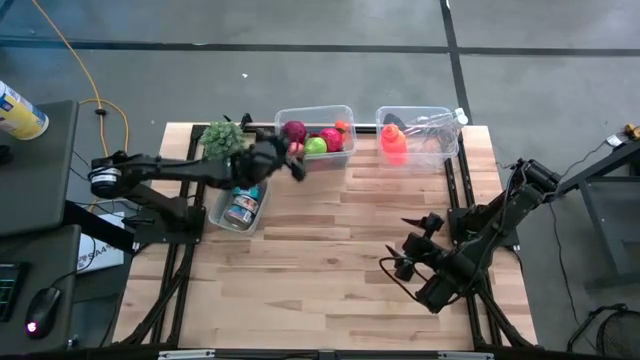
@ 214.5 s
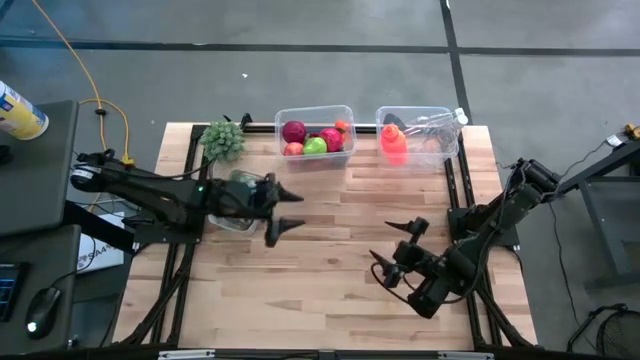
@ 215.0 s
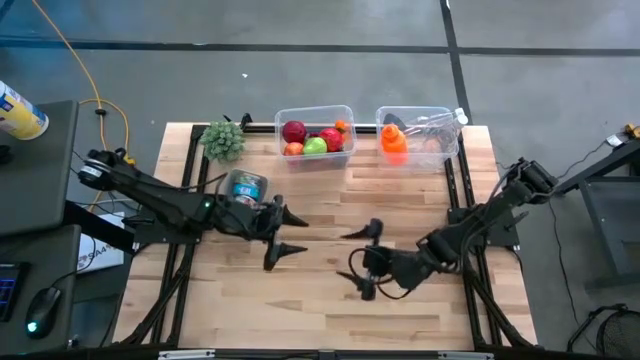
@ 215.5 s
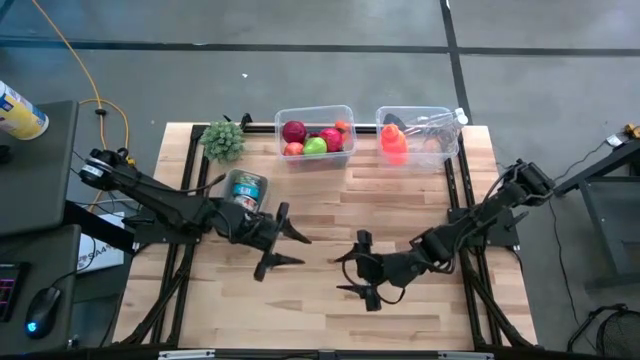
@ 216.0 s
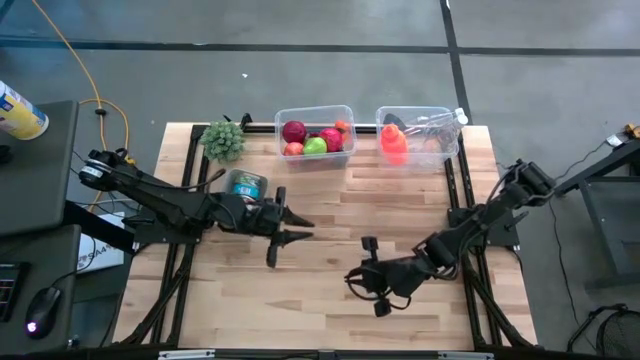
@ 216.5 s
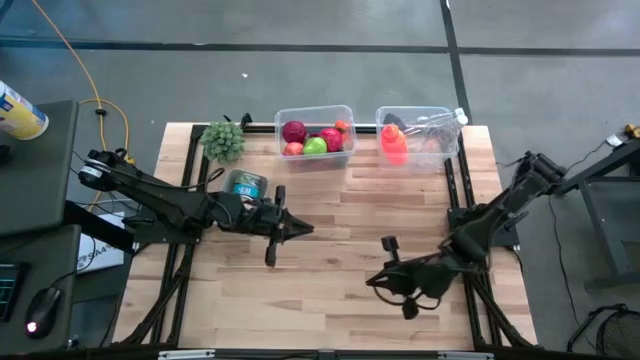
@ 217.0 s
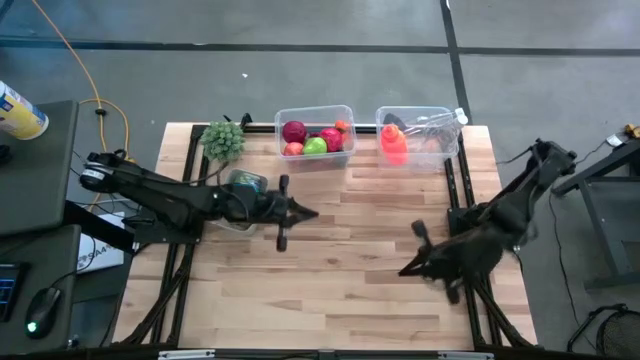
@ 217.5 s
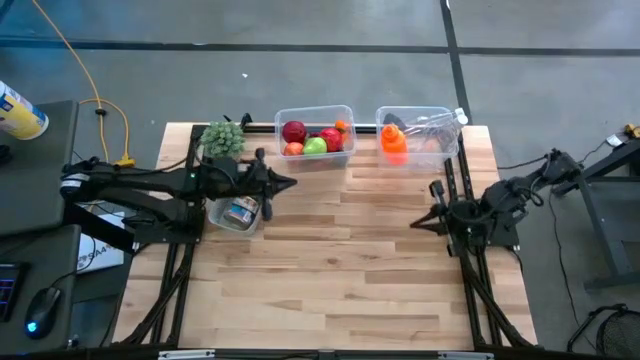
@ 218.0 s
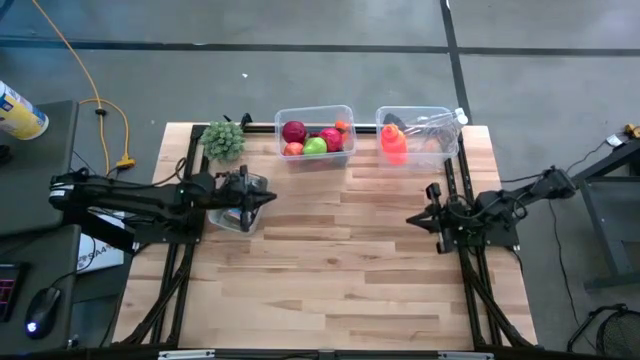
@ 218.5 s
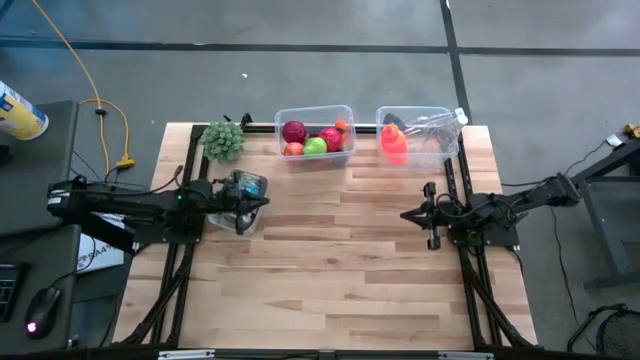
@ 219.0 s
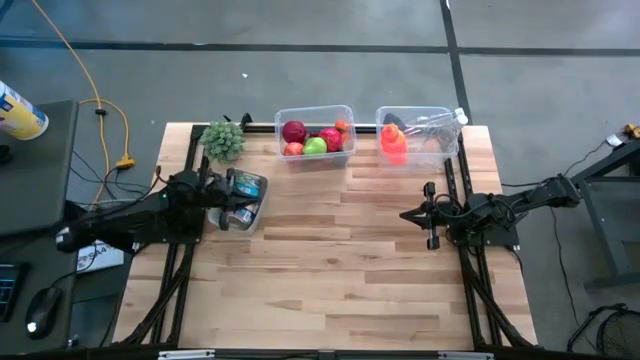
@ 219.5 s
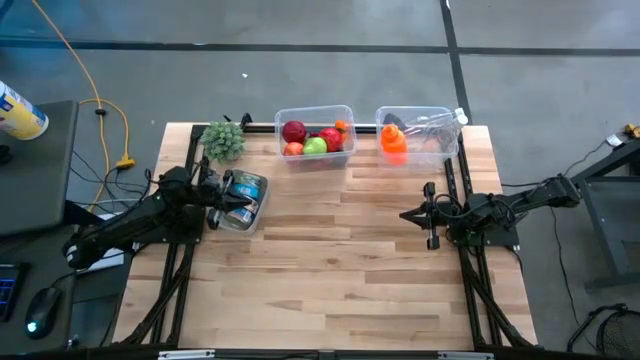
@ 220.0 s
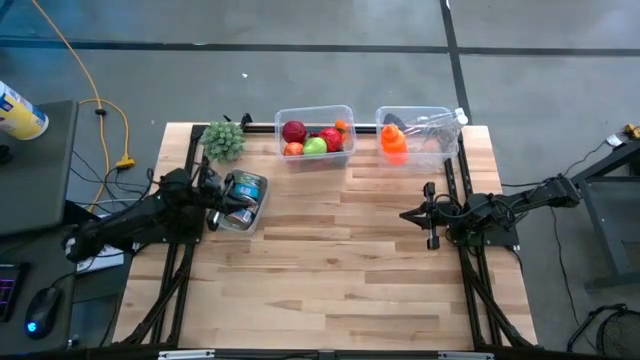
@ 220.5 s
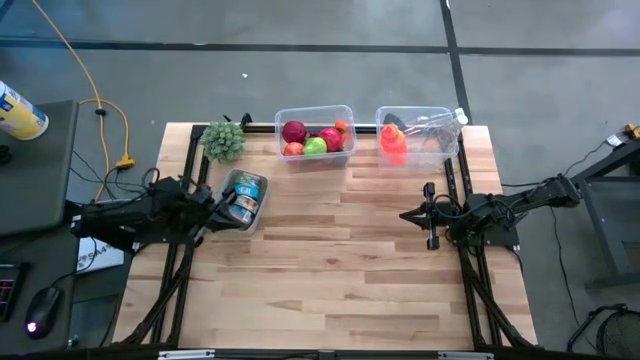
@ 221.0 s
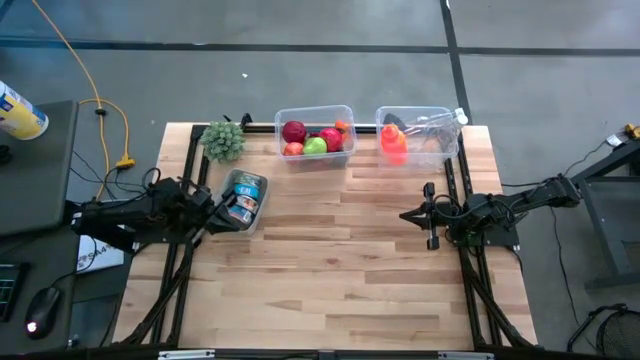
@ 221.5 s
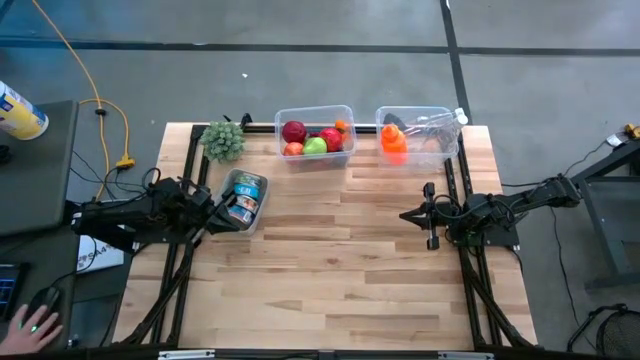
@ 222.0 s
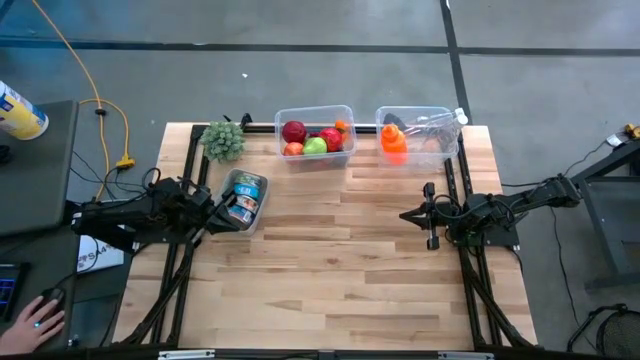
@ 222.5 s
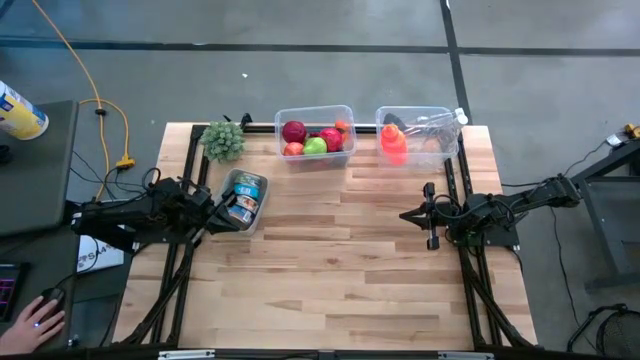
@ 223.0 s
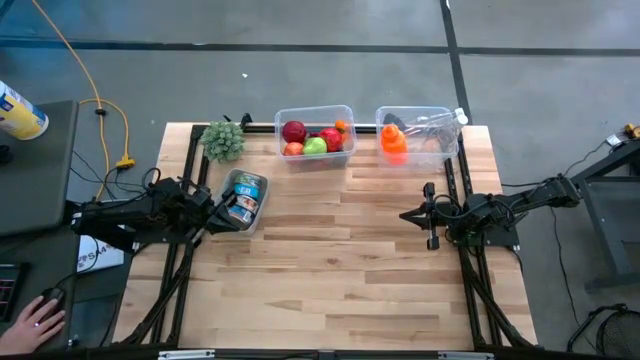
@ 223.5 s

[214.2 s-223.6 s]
Task: Pick & Place Food Item
Return to Home Position

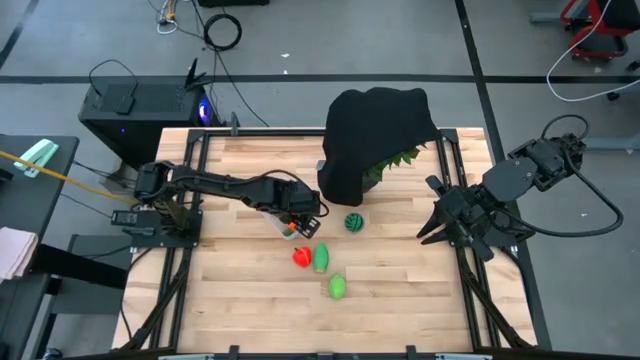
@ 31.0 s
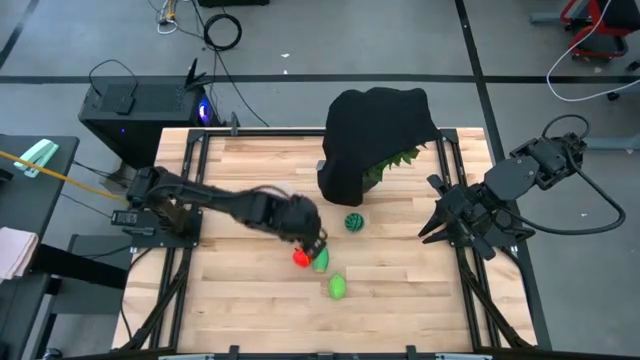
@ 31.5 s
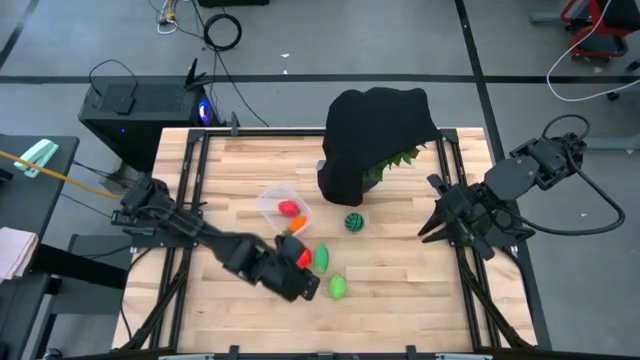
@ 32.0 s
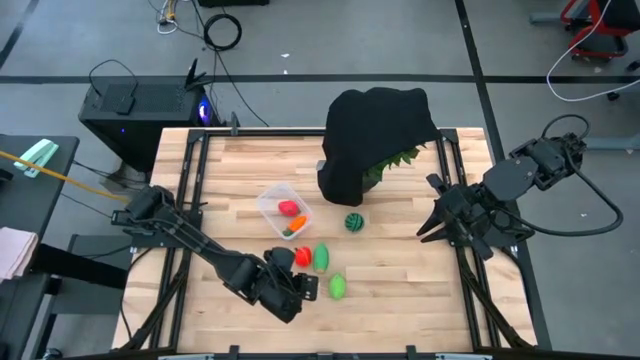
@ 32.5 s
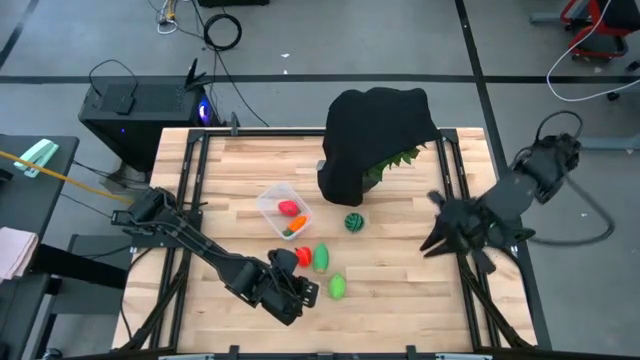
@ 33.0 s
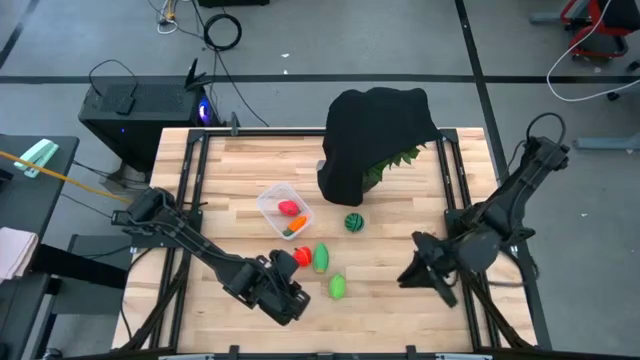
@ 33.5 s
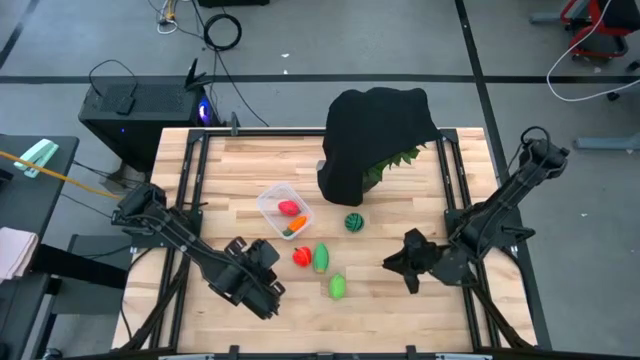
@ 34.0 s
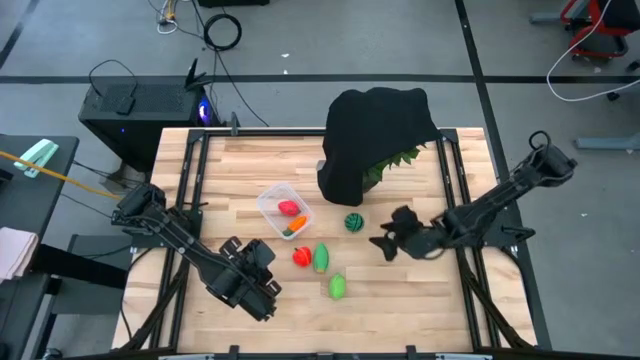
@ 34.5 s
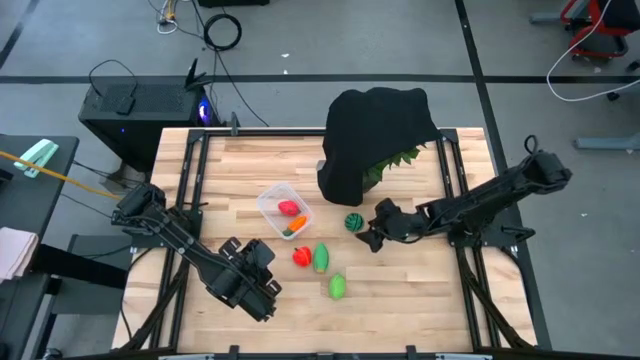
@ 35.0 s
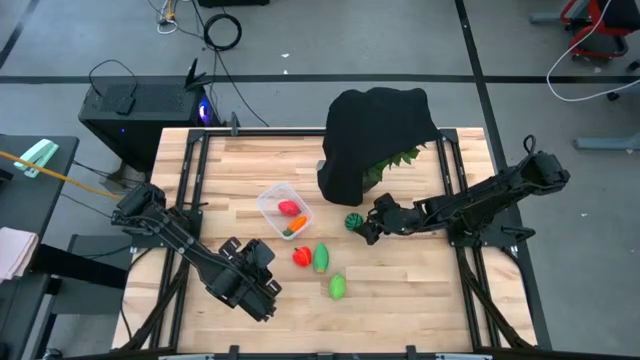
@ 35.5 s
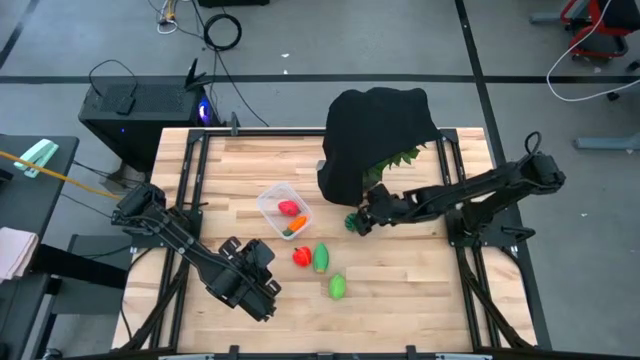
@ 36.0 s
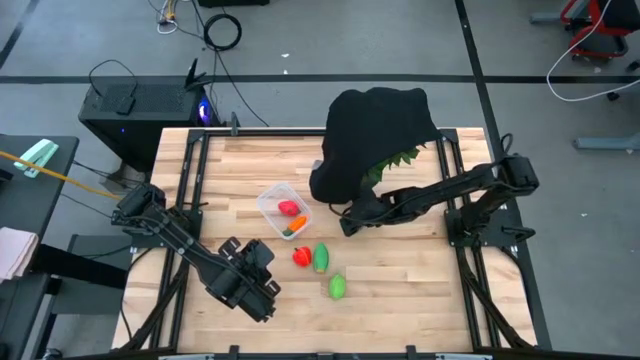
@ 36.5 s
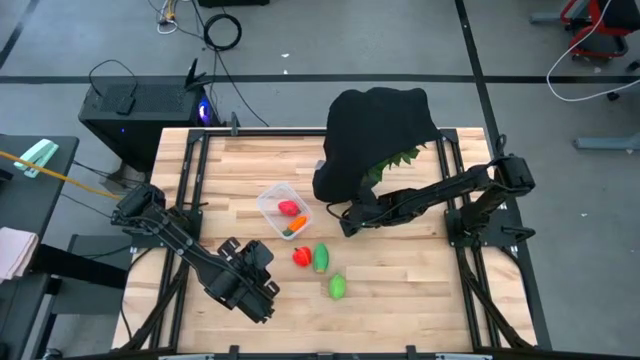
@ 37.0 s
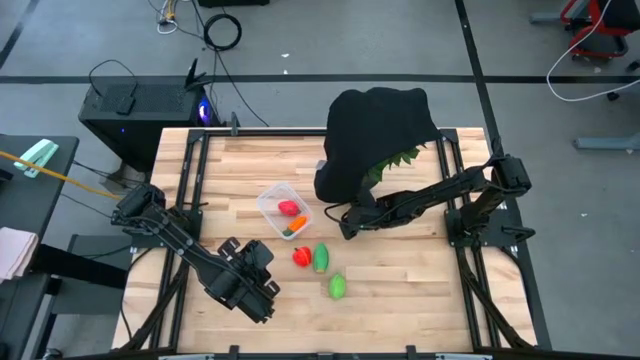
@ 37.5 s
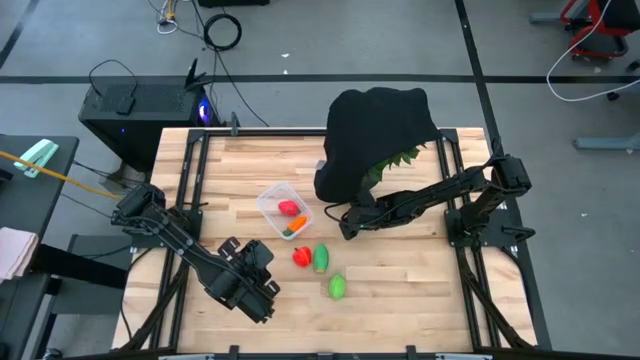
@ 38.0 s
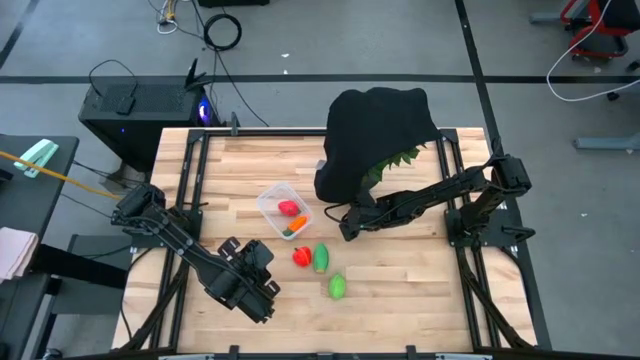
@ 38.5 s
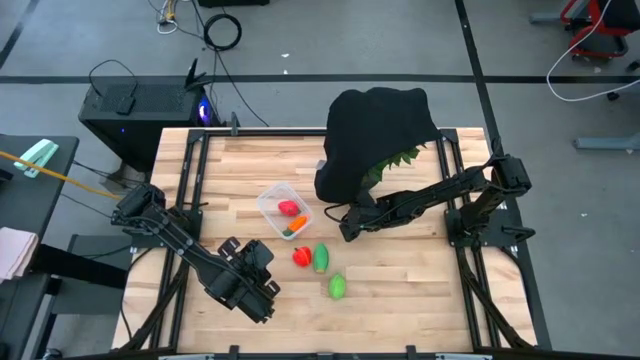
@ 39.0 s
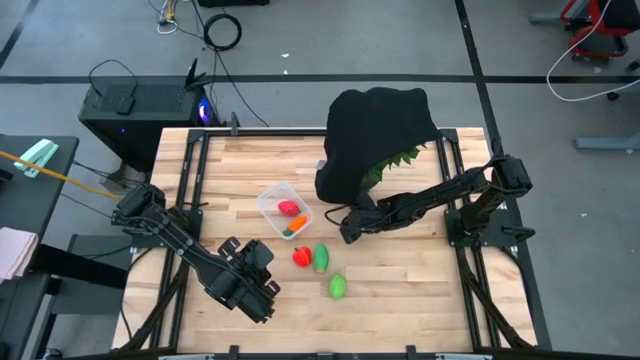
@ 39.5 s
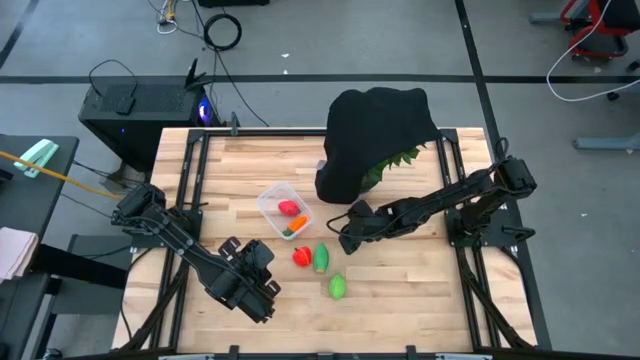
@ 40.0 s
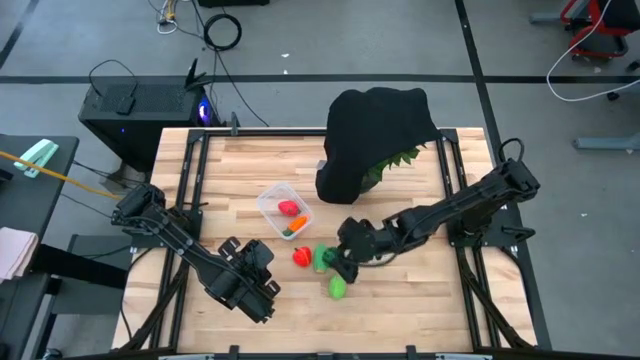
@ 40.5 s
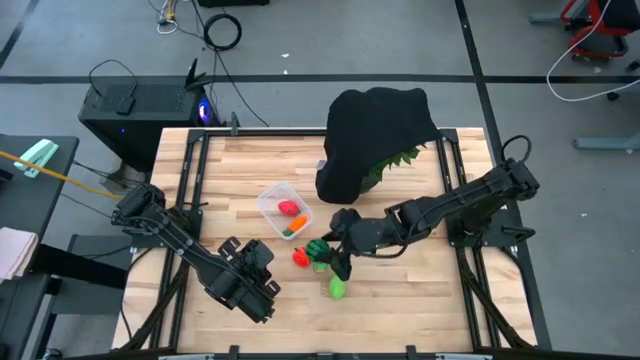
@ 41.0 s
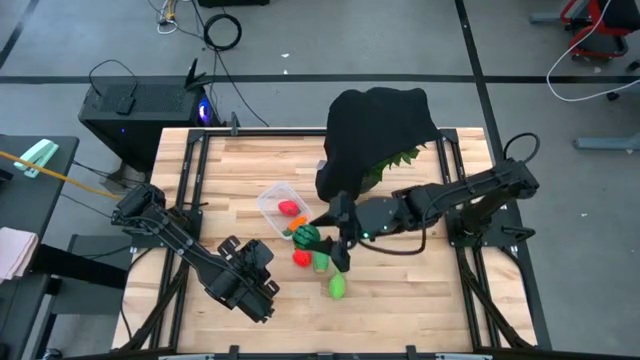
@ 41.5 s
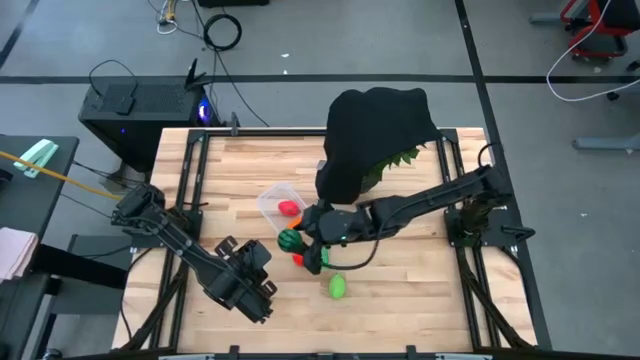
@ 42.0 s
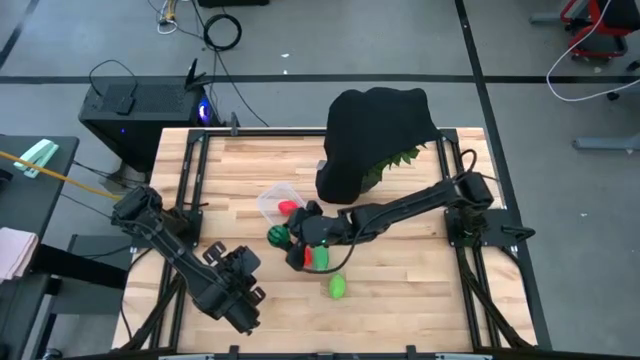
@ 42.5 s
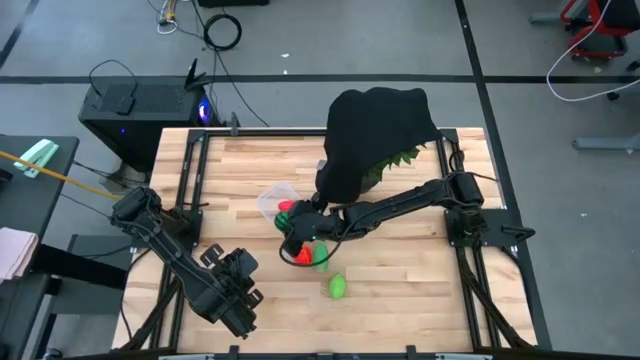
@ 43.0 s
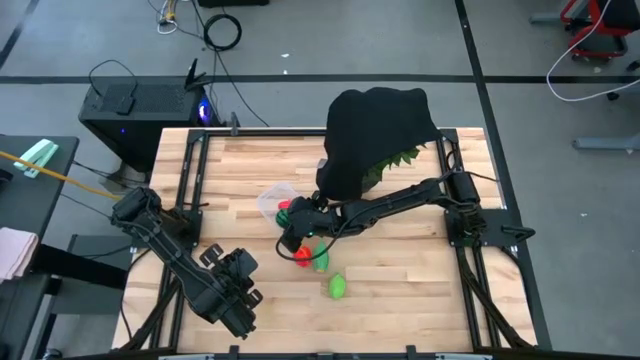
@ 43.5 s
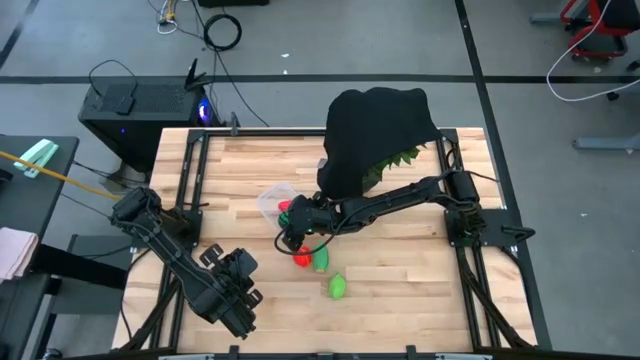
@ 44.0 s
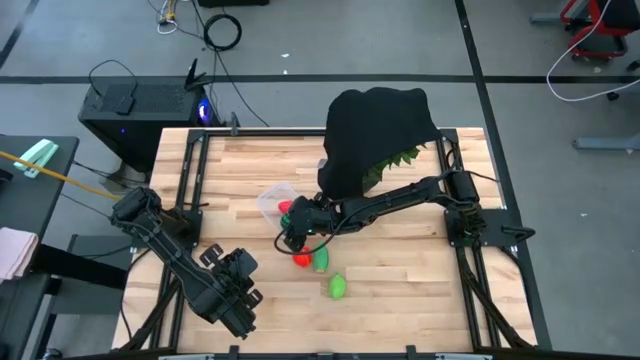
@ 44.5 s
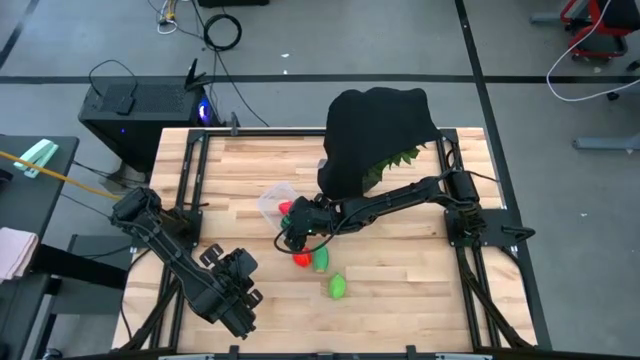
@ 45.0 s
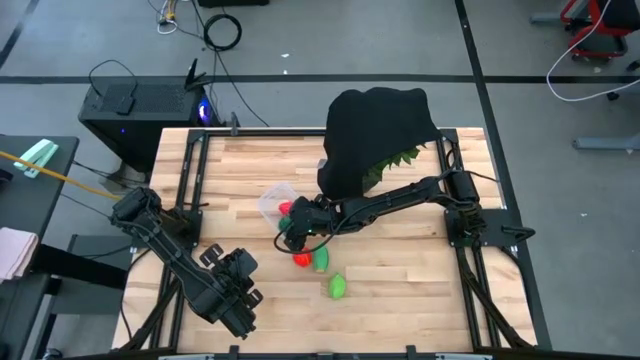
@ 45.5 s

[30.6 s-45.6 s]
Task: Pick and placing Produce into tupperware
Put the green watermelon into the transparent bin
